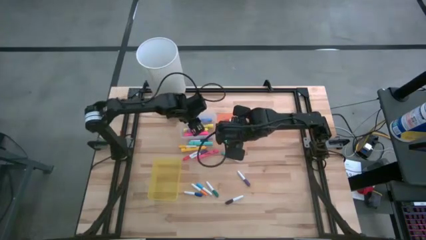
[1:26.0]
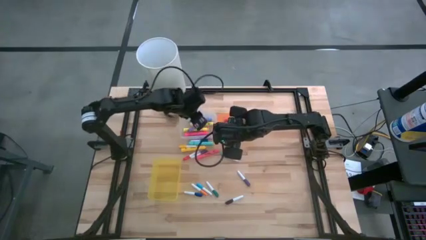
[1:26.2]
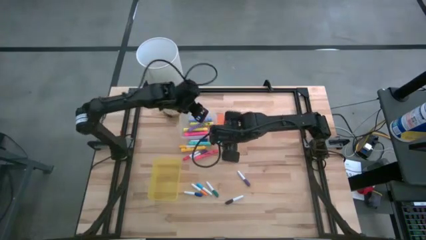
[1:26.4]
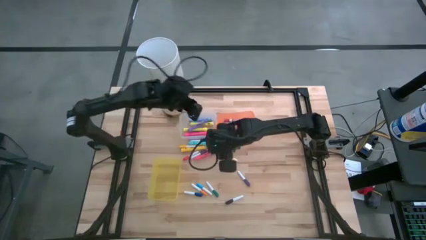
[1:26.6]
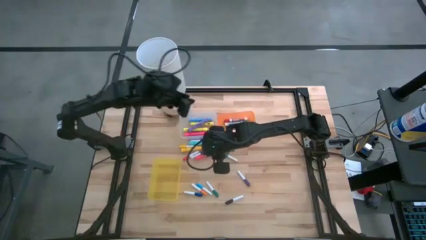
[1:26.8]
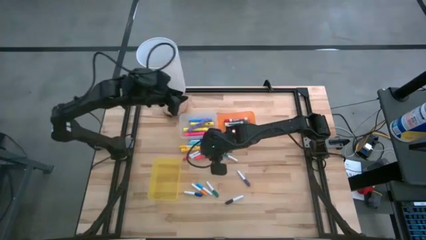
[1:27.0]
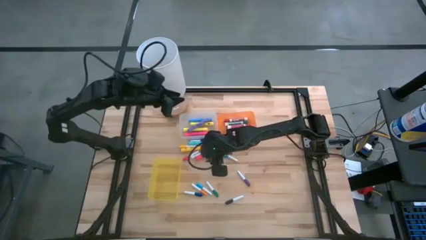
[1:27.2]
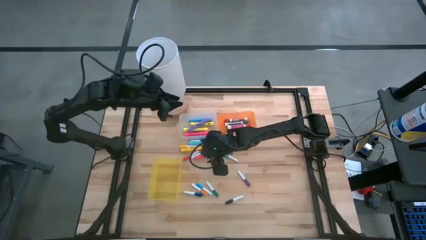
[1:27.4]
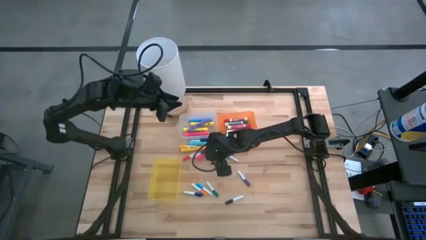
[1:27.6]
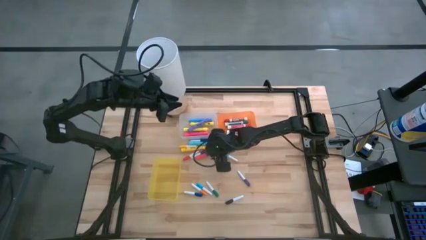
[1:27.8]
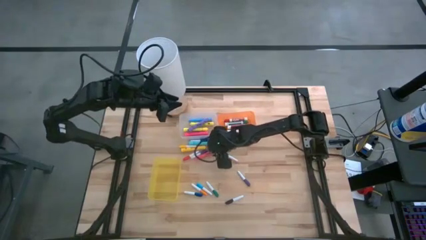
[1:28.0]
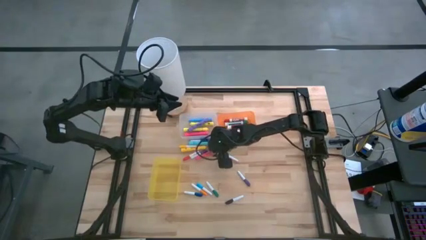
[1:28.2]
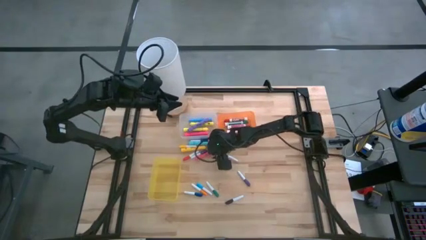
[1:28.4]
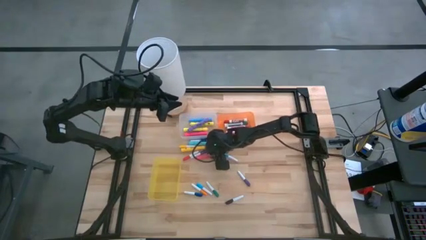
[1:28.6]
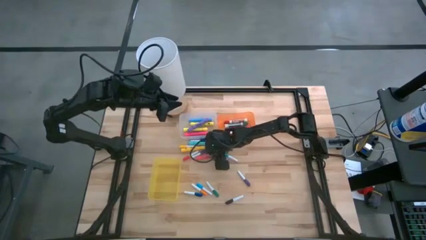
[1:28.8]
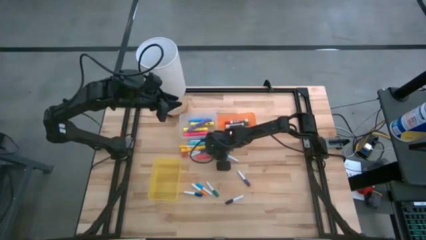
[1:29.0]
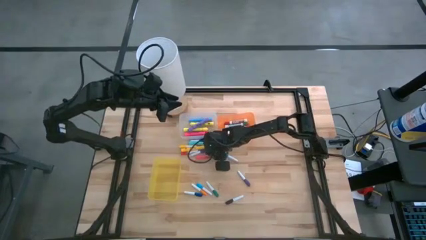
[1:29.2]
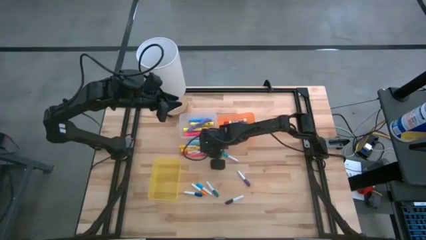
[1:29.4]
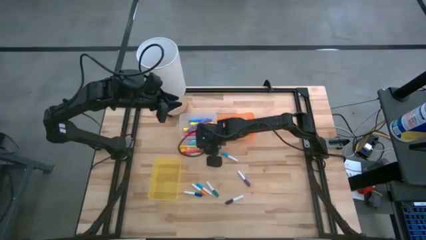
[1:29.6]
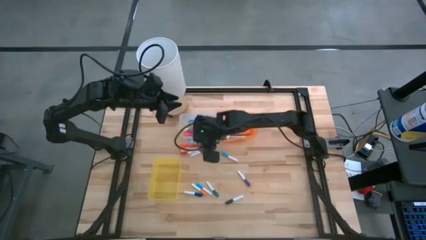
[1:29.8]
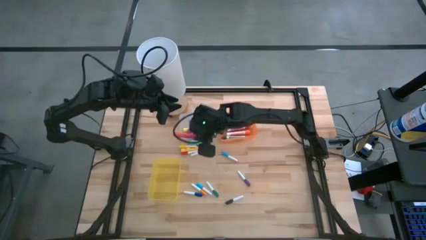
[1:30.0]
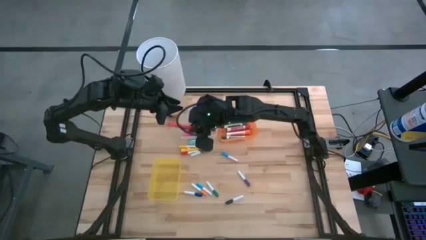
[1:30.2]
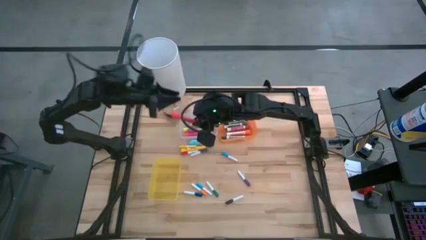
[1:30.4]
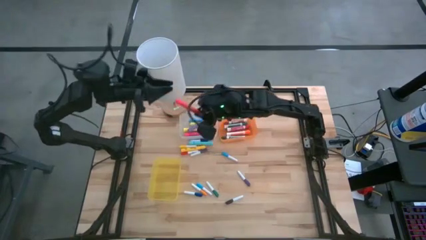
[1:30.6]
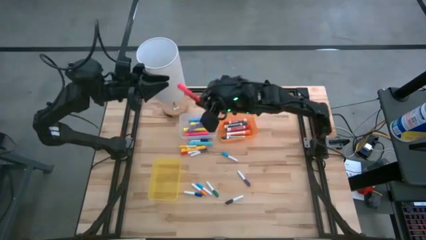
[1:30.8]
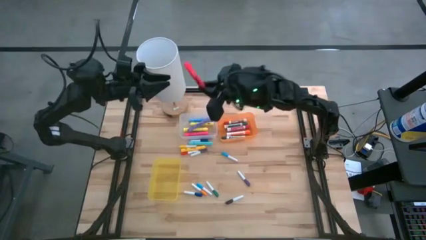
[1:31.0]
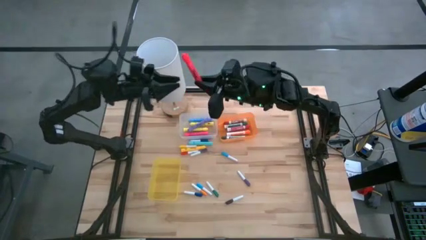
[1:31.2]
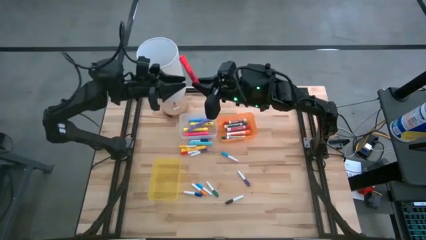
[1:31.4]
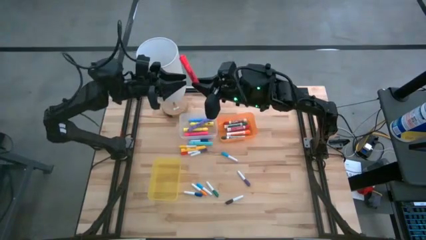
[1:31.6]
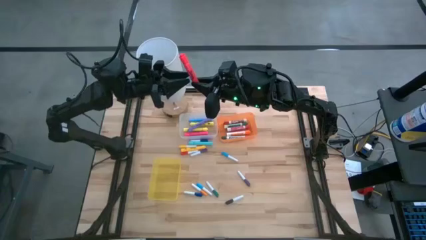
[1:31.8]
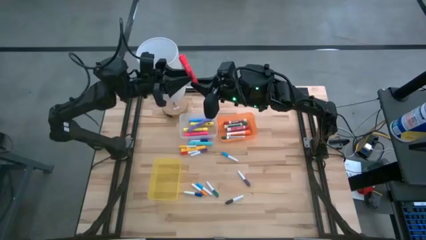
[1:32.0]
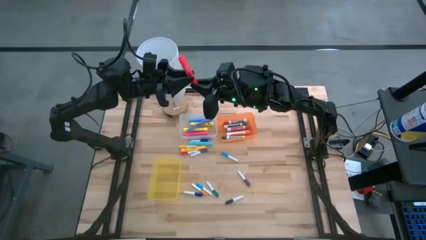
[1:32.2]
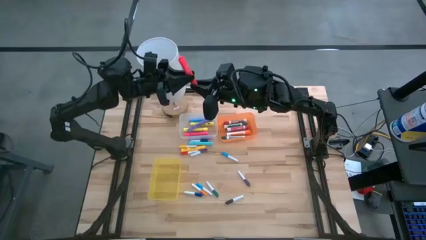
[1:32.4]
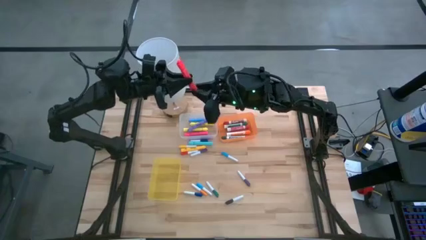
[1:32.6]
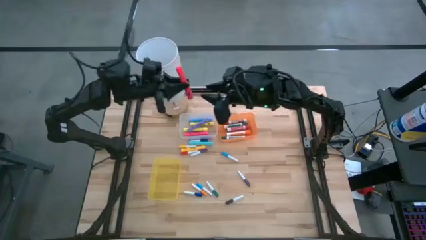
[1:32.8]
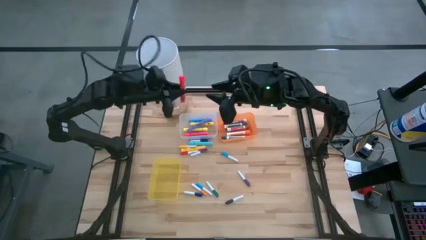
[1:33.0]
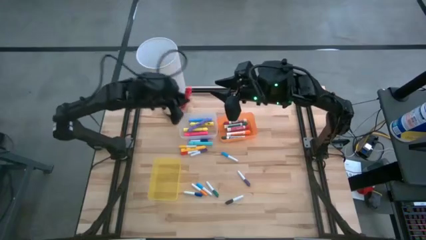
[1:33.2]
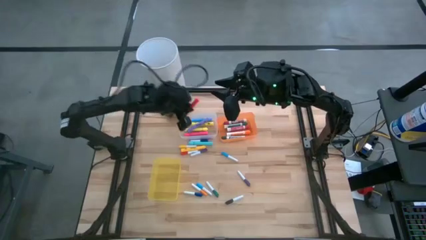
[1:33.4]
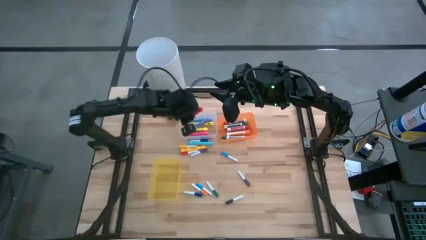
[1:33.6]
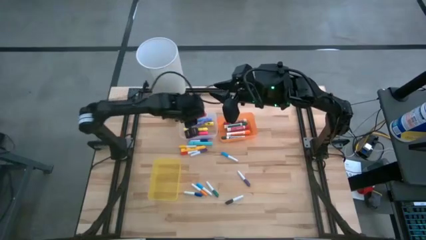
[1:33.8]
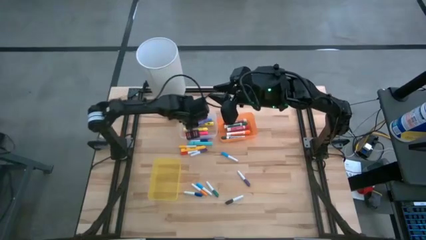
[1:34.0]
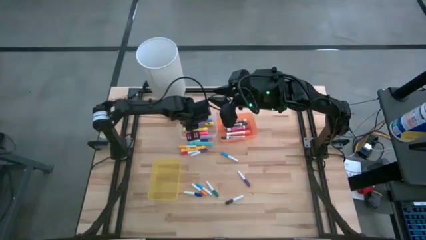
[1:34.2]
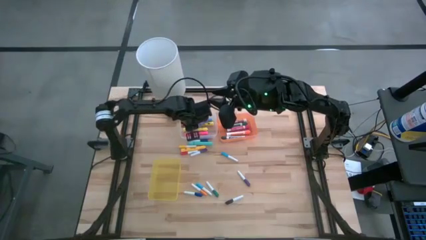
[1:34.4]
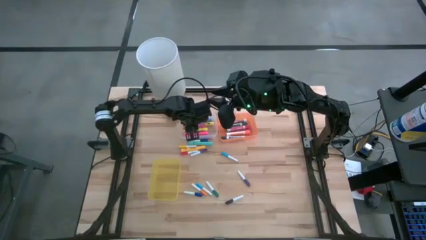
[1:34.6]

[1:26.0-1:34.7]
Task: Pick & Place Markers
Put the pink highlighter into the transparent bin

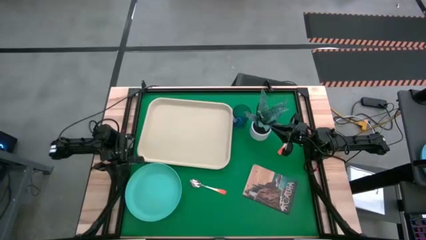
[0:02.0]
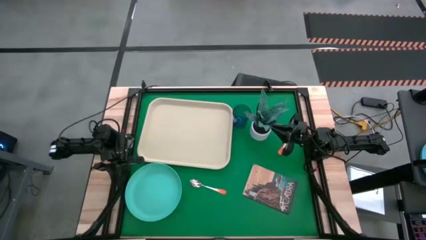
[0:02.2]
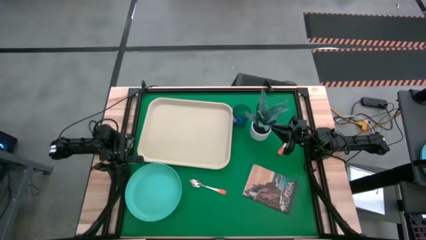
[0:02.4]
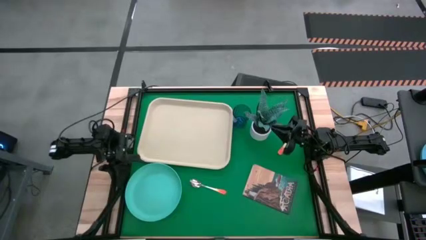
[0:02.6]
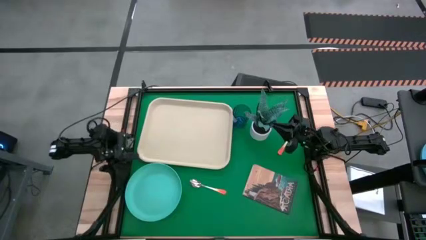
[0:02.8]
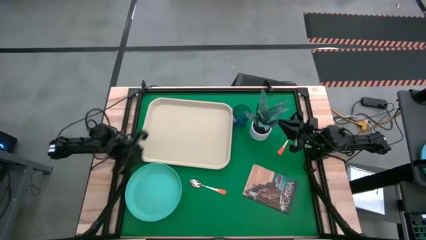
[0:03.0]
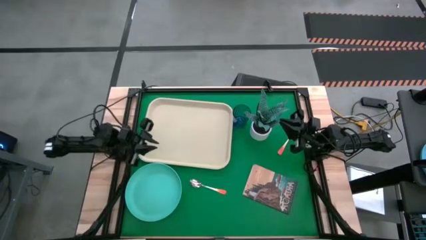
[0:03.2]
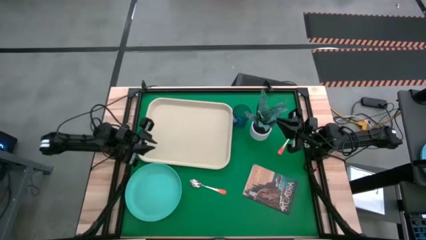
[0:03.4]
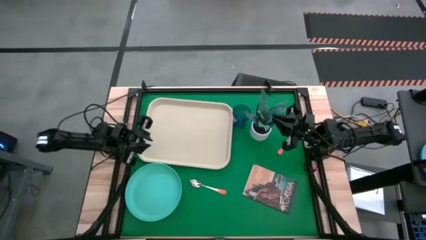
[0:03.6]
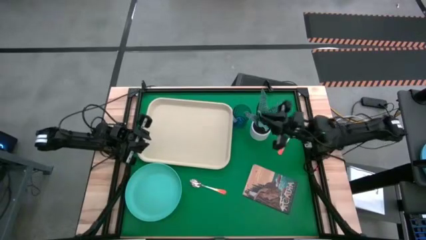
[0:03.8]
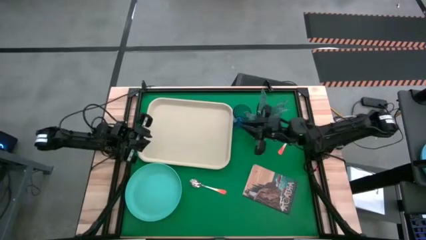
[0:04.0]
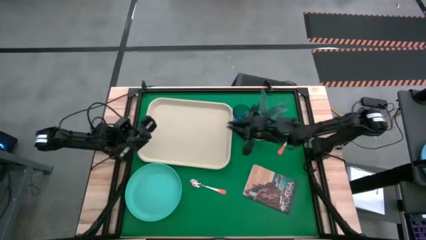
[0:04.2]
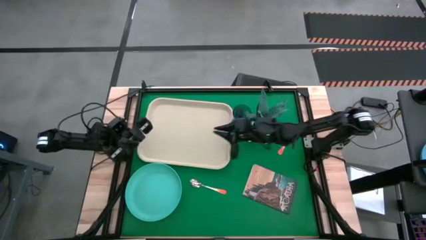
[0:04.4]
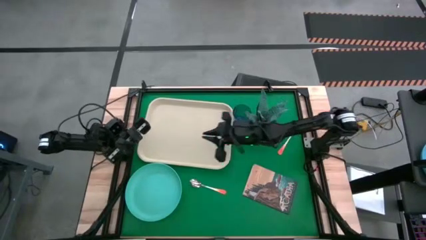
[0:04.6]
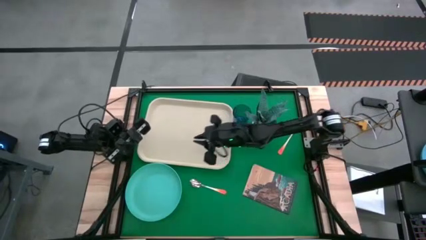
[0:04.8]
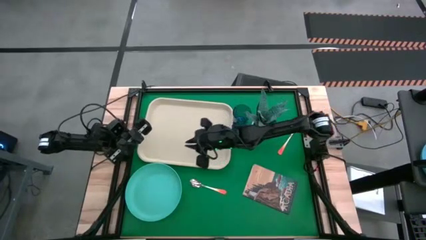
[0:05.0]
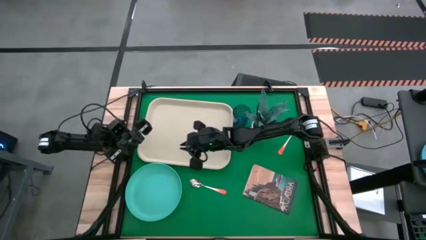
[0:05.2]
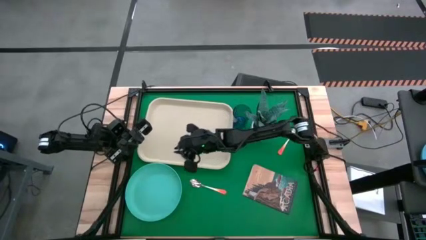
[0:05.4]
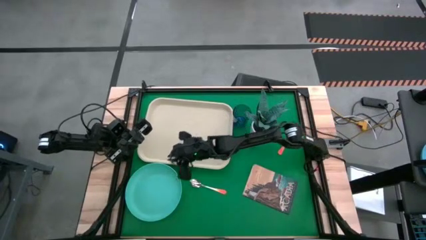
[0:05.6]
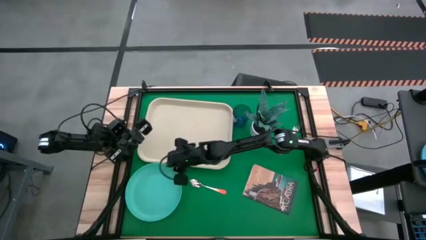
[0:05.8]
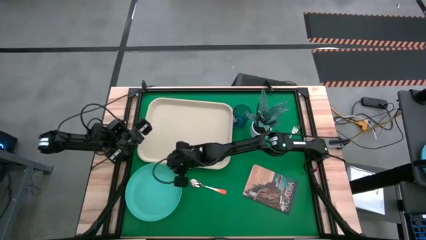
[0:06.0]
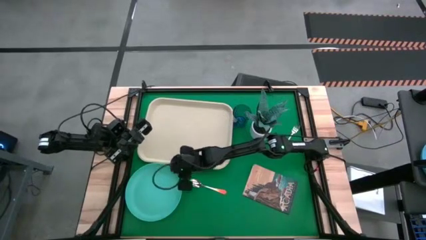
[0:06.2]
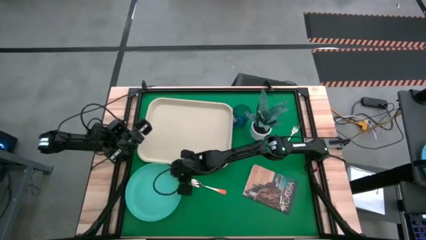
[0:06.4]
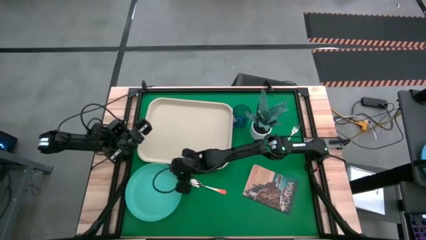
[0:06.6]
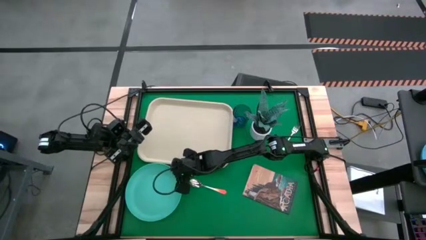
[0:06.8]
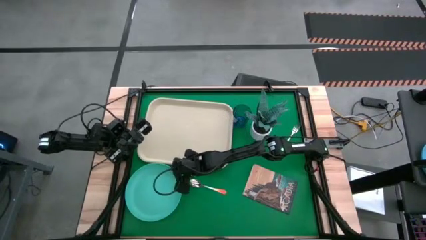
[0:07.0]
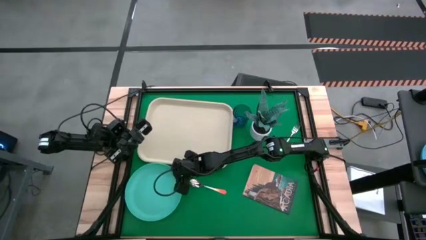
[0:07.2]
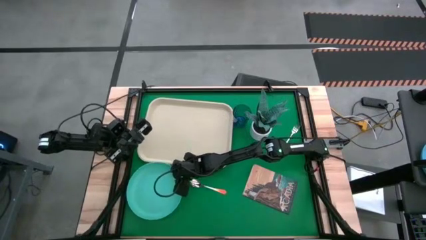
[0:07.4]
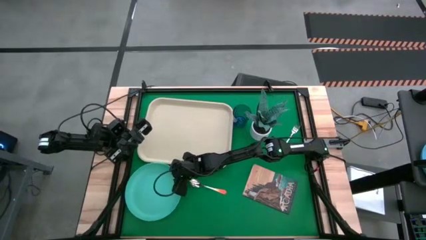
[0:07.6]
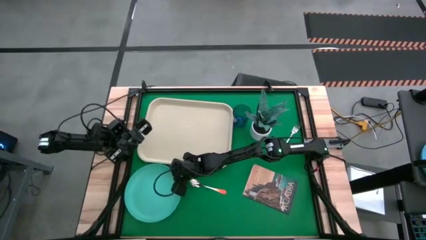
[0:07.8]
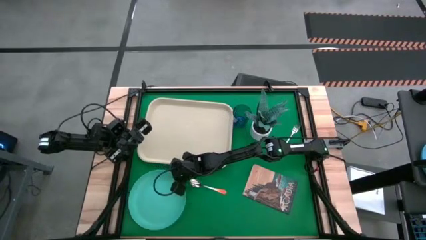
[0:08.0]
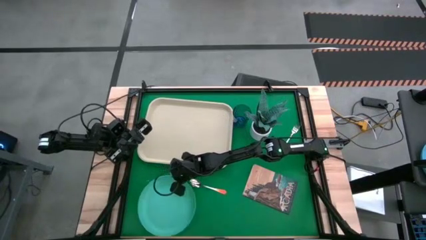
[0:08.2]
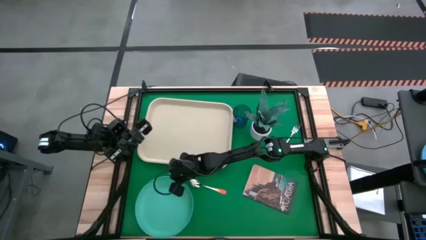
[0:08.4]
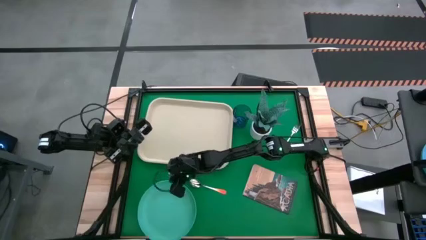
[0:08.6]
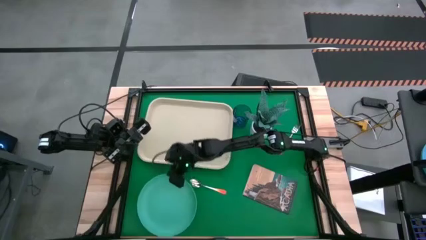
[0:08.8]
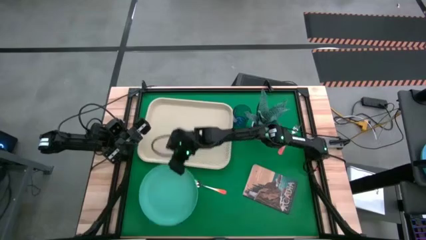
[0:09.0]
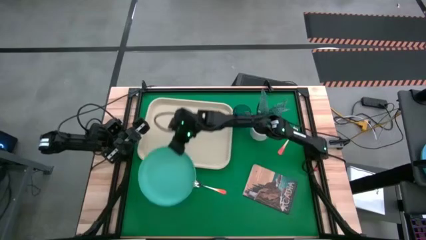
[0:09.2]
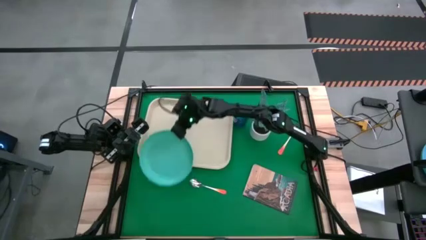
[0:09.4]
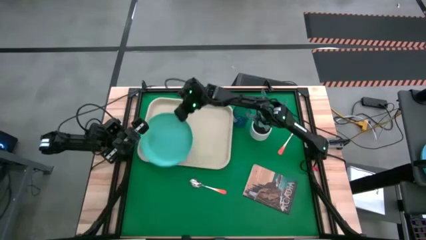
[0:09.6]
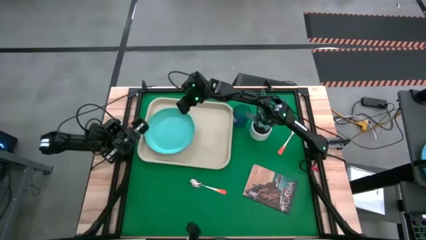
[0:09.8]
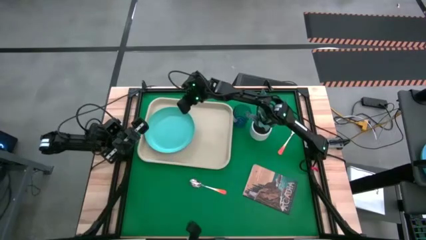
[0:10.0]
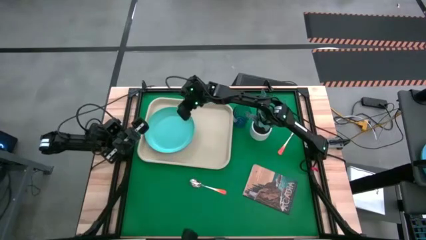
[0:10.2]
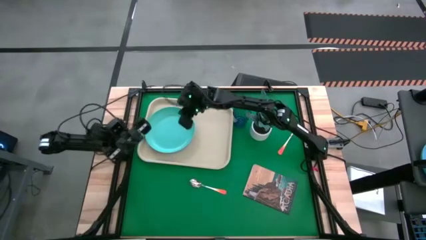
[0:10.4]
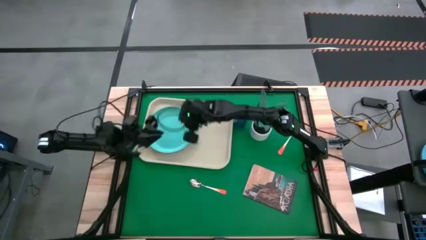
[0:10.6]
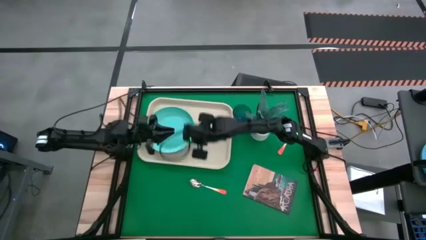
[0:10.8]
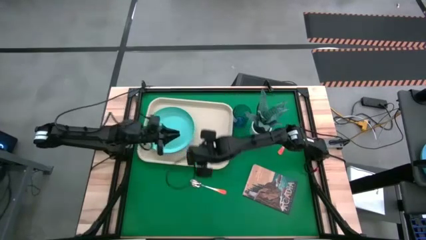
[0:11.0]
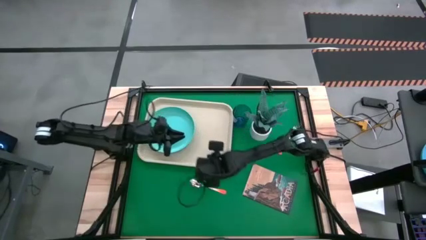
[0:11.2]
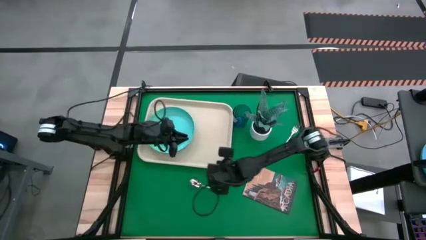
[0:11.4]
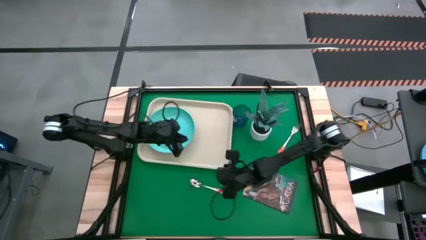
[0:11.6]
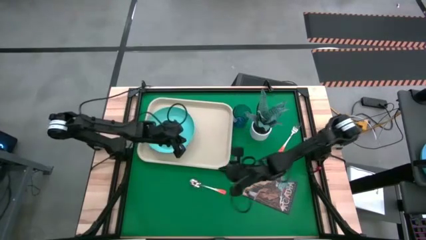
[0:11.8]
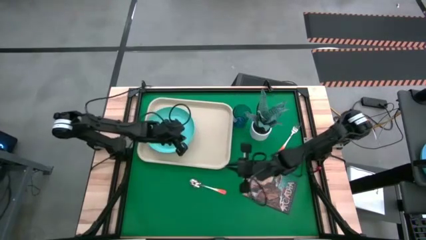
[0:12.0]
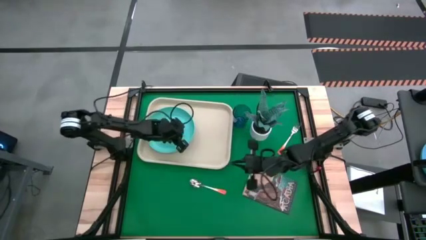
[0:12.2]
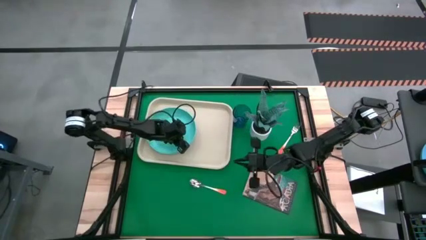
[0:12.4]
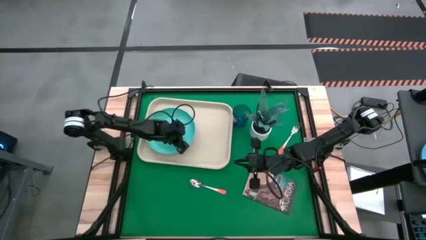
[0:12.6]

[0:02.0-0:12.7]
Task: Pick and place plate/cup/fork/spoon on tray
Put the blue plate on the gray serving tray
